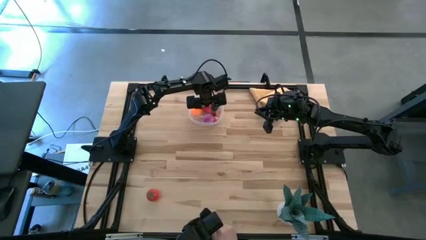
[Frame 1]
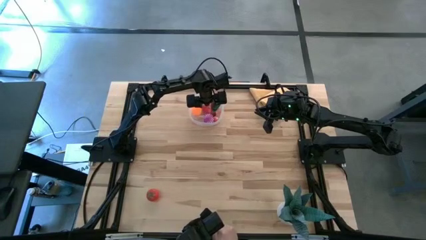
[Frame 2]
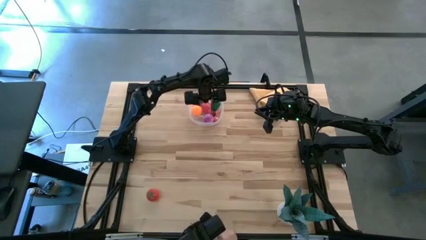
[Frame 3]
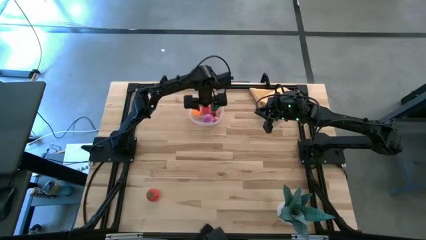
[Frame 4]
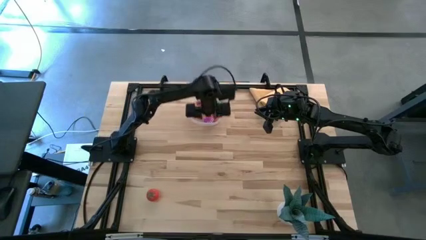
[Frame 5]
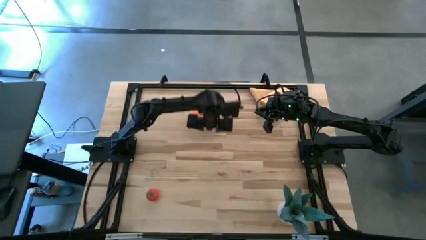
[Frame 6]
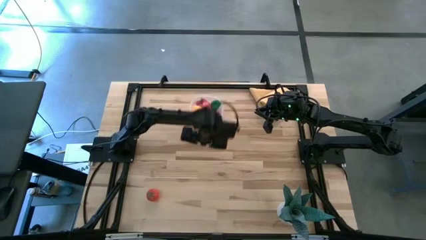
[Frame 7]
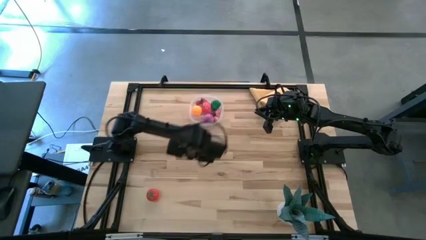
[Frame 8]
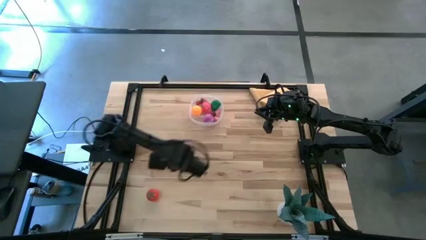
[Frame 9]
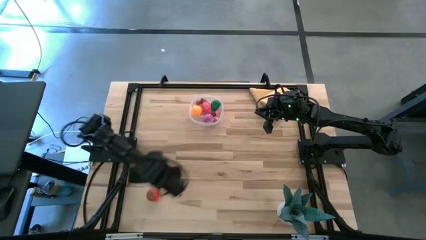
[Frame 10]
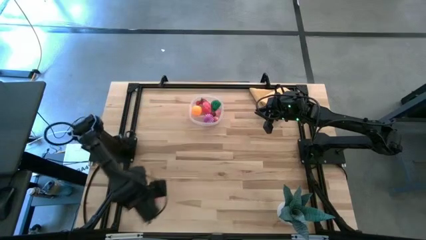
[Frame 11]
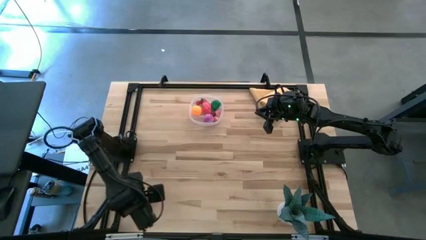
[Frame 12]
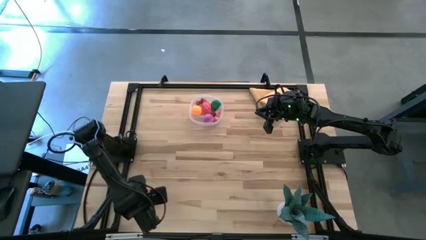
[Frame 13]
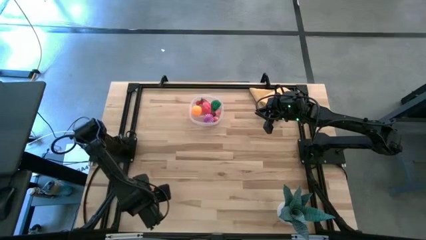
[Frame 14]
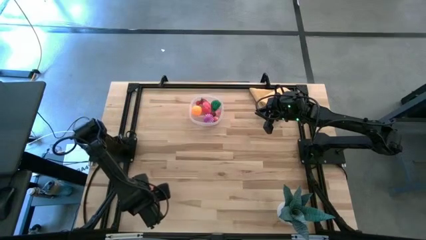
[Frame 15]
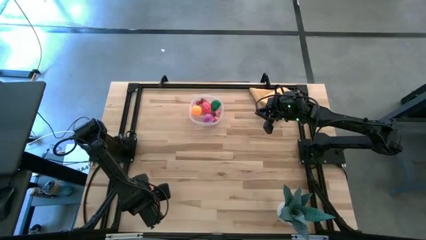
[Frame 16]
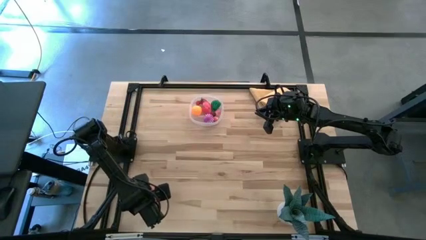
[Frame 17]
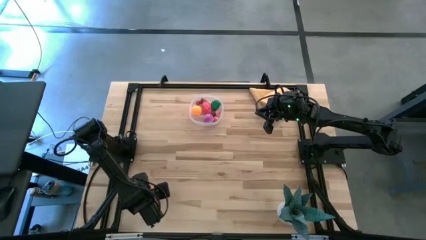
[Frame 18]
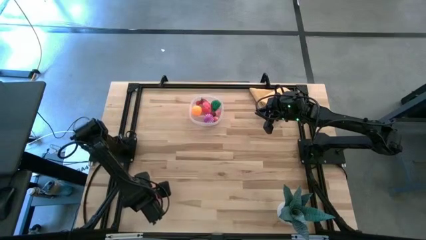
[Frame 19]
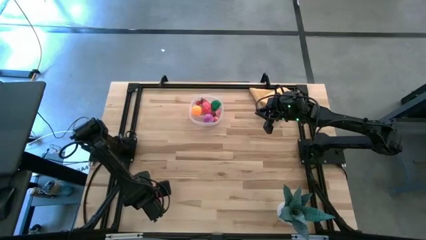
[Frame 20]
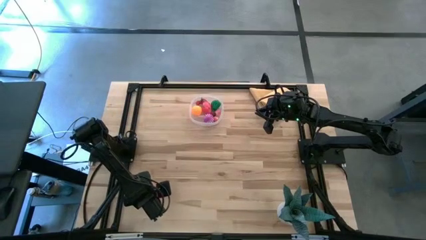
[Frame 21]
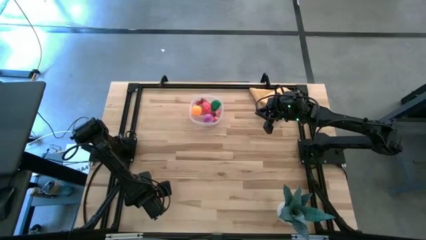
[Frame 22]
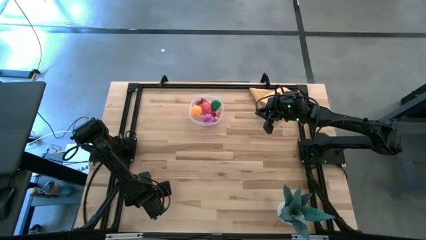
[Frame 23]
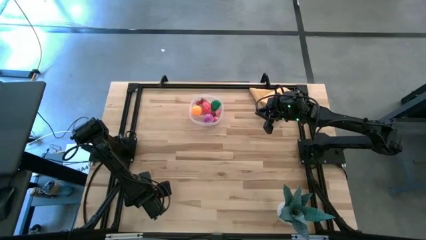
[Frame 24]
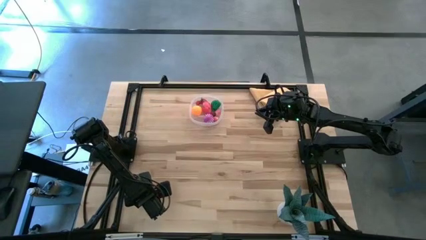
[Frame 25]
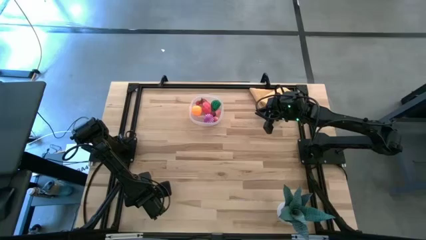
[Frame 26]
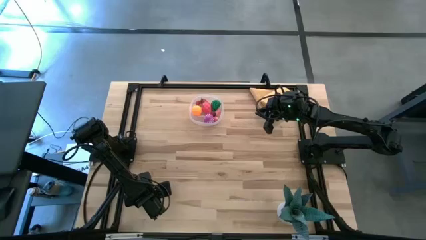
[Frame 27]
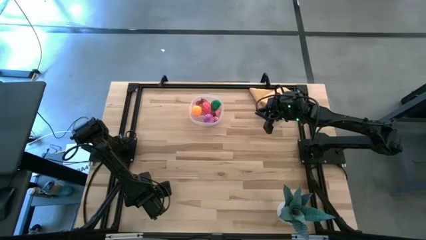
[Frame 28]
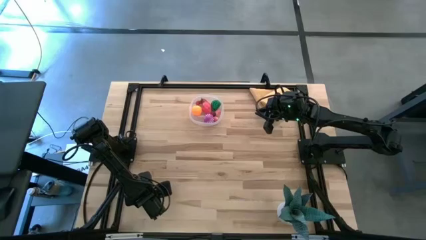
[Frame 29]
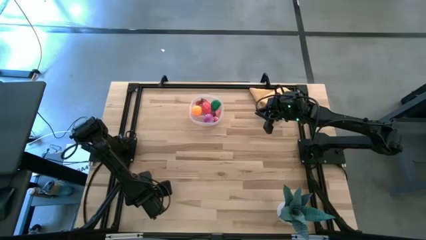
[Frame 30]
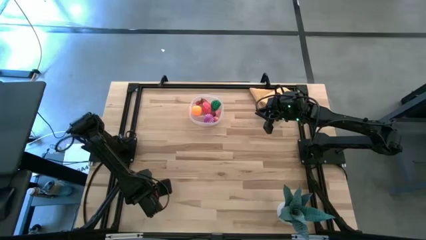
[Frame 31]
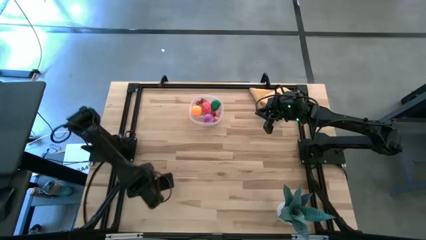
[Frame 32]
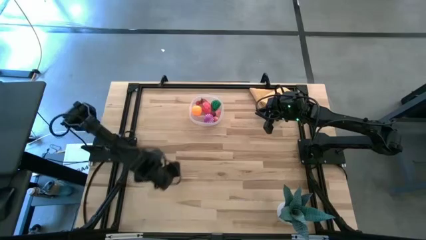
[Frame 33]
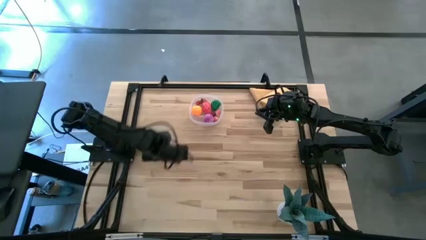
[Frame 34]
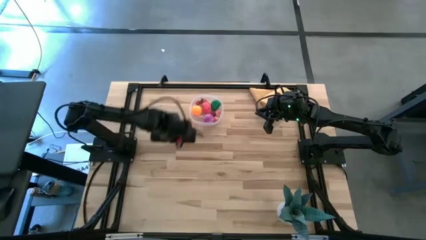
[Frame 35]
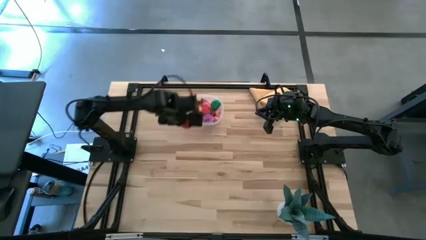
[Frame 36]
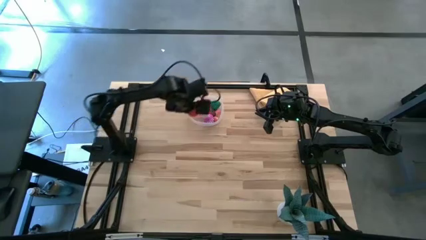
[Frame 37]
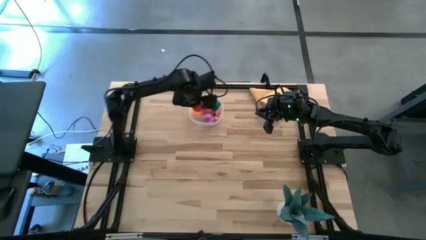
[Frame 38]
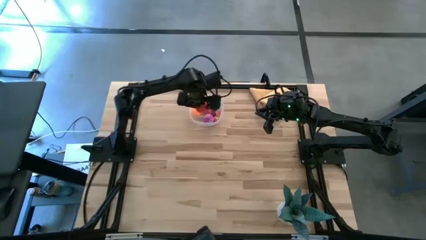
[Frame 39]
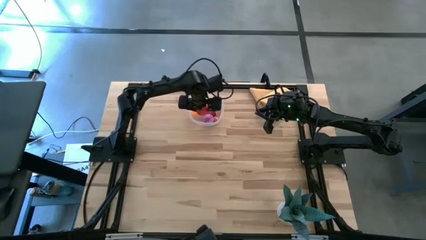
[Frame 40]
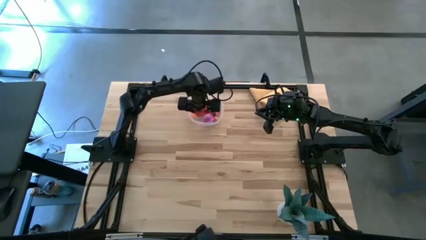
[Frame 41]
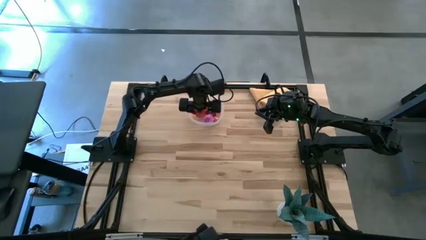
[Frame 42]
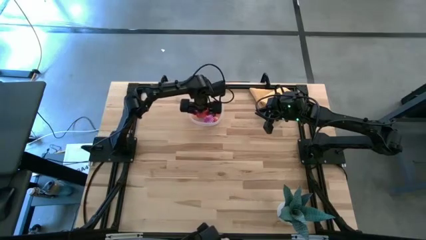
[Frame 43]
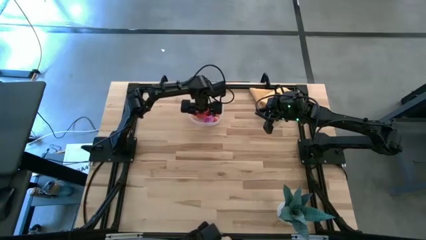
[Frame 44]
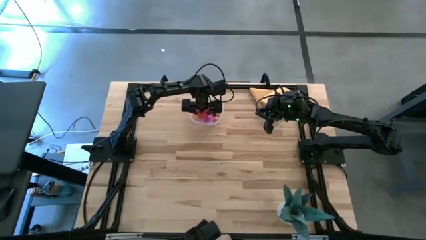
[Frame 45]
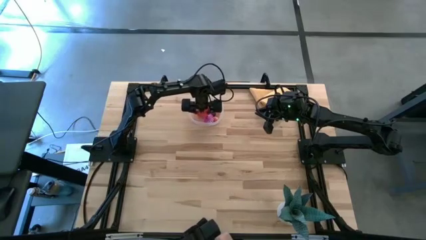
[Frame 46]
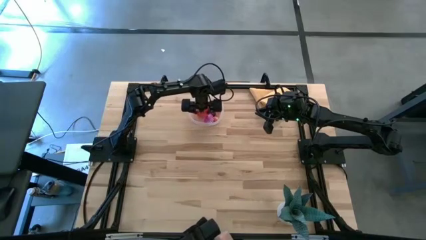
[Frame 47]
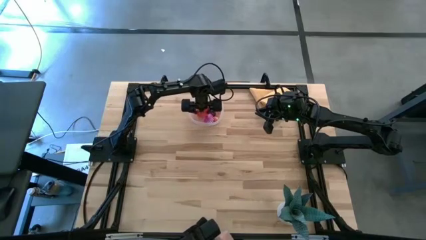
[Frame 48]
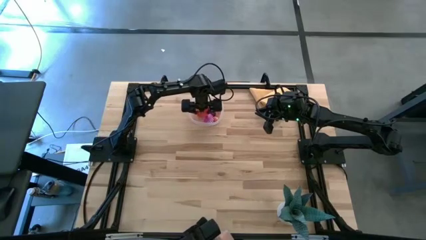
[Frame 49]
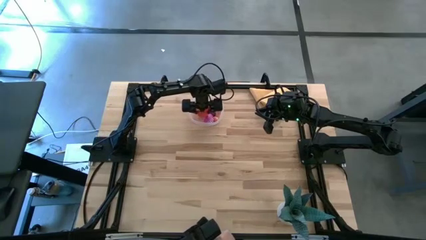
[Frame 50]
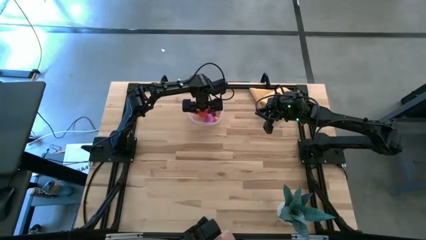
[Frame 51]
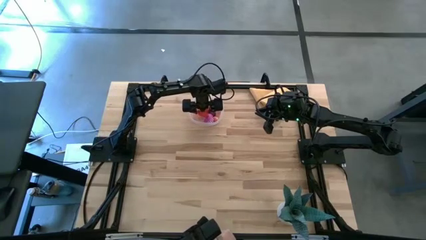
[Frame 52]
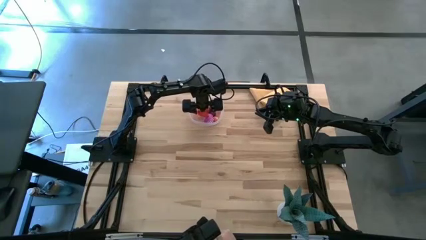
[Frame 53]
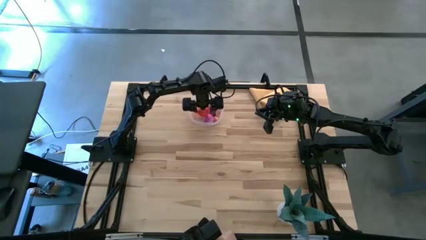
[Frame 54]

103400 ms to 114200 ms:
Task: Pick and placing Produce into tupperware
Put the red tomato into the transparent bin

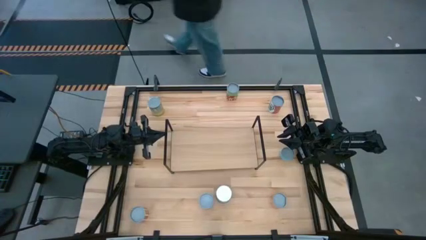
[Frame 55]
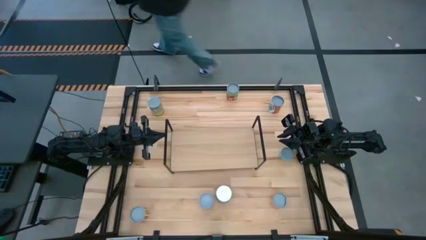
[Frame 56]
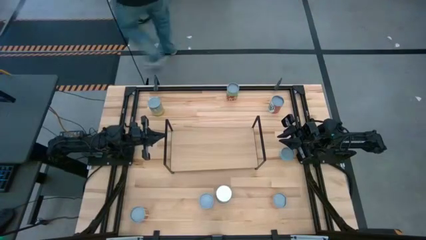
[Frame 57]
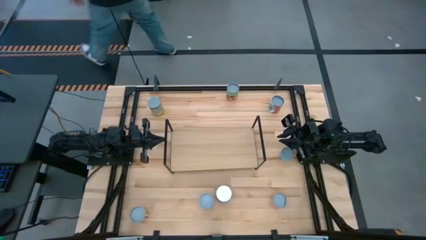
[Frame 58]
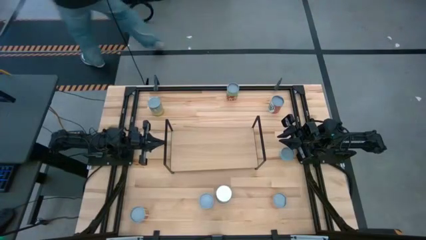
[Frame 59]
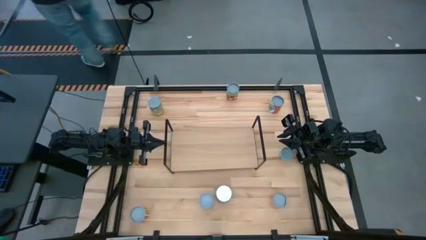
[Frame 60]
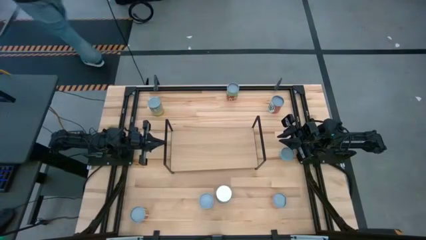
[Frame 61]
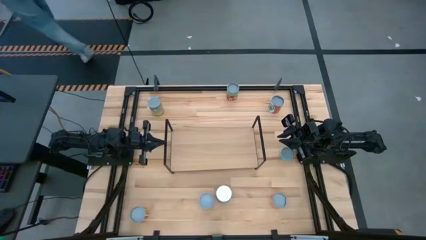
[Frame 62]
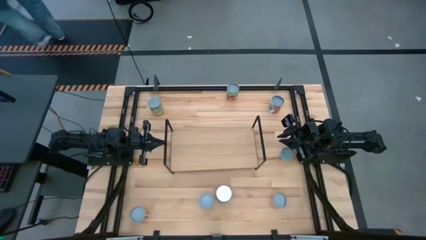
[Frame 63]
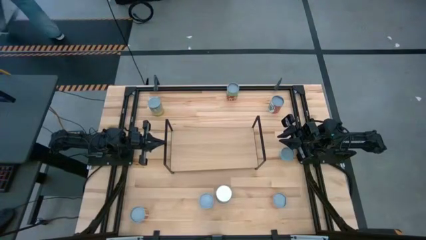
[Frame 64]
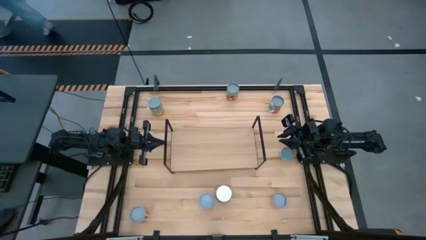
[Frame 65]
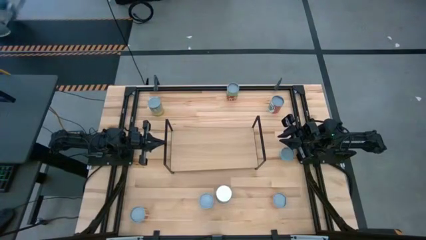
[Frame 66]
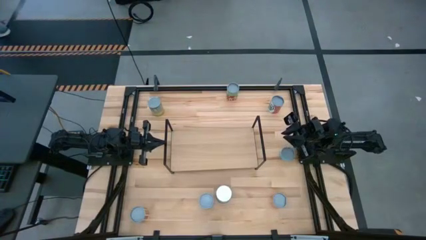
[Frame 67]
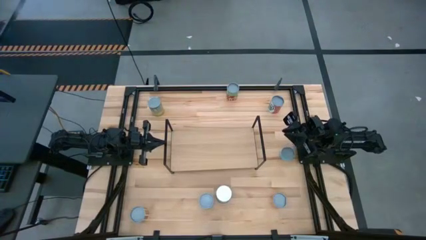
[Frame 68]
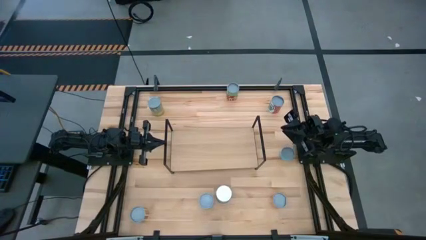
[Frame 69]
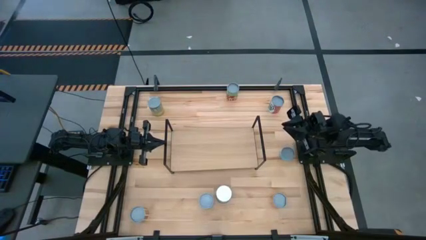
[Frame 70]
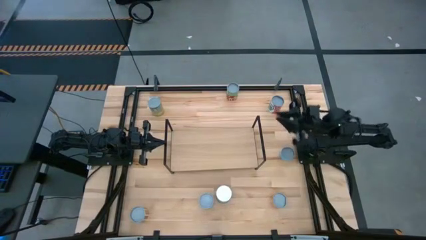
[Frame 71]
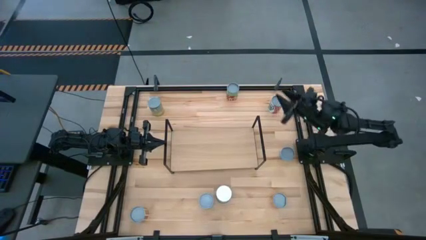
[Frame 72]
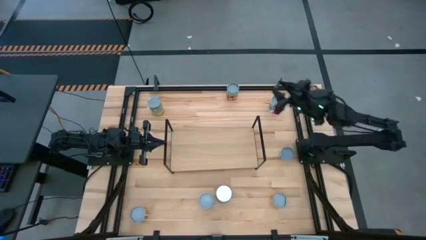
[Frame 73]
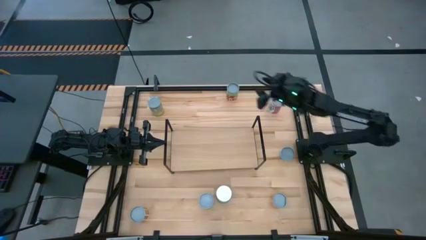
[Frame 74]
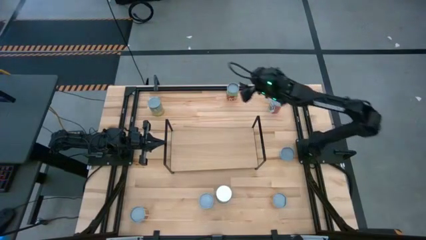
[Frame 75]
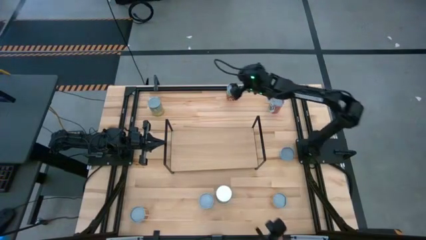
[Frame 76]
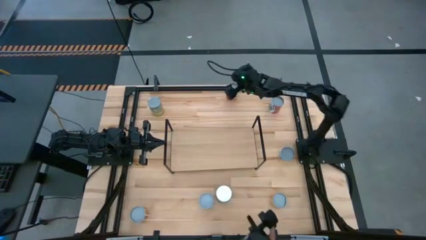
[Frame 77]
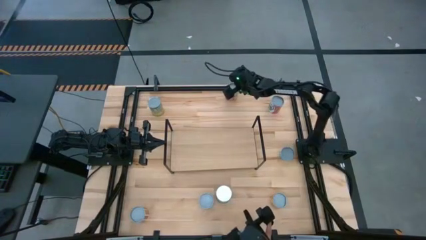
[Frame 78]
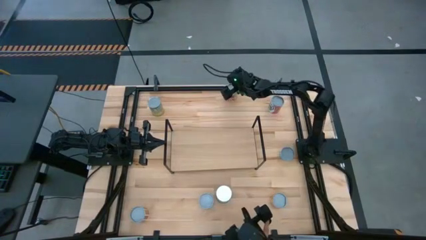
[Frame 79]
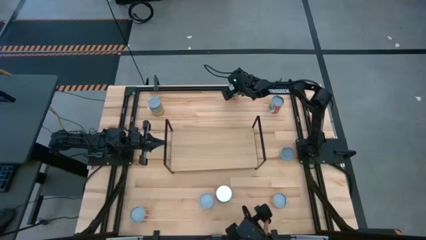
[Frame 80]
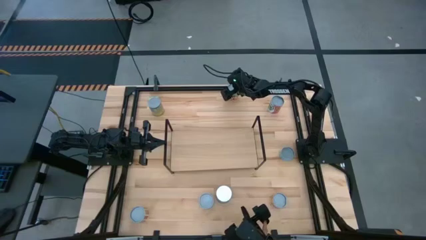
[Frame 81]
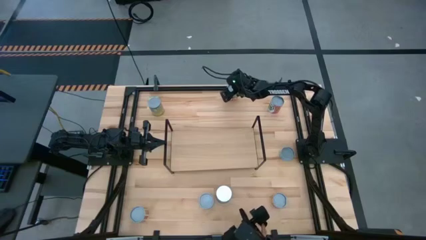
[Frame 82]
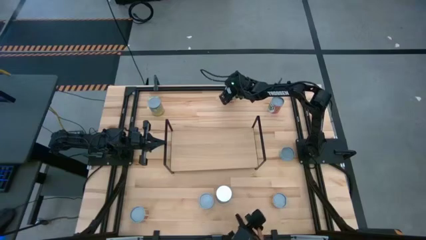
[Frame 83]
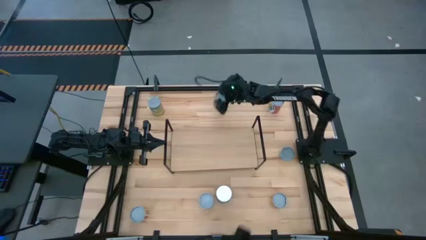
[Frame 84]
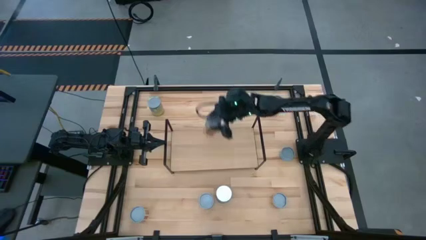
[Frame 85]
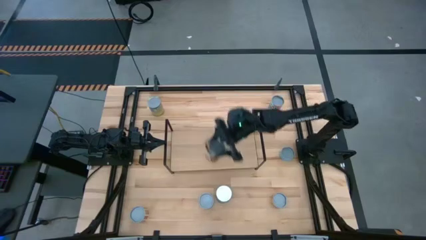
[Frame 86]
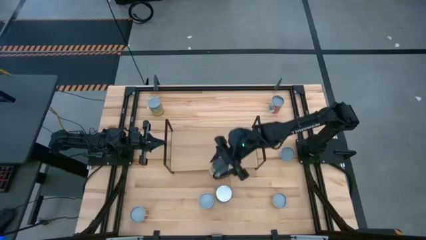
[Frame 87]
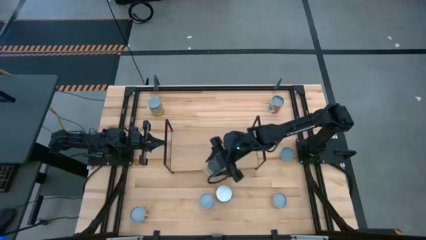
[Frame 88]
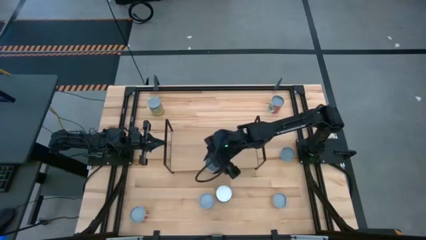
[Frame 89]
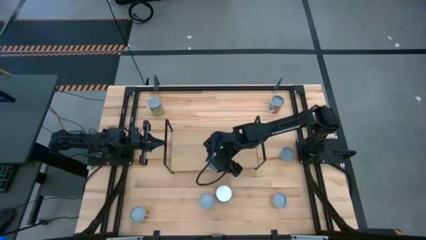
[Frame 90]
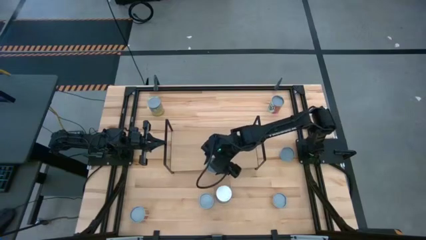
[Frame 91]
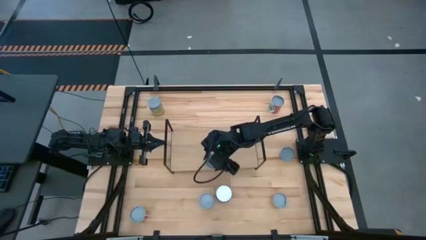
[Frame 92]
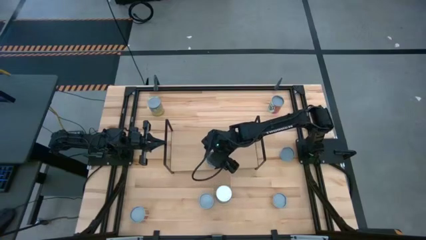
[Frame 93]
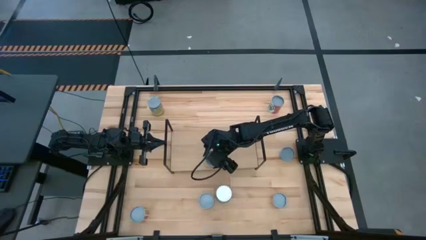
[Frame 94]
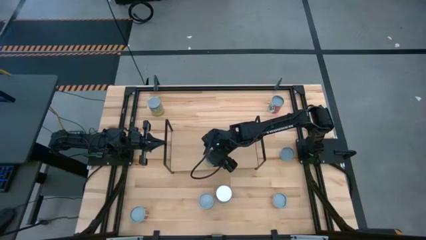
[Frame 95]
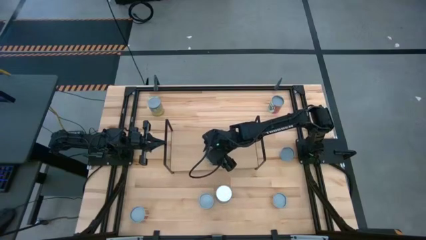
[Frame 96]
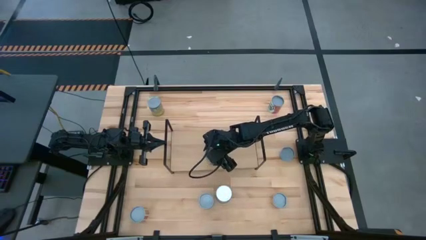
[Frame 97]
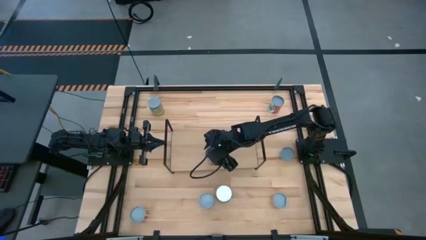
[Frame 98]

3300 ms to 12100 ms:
Task: Pick and place cans onto a shelf
Put the canned spaghetti sauce on the shelf
